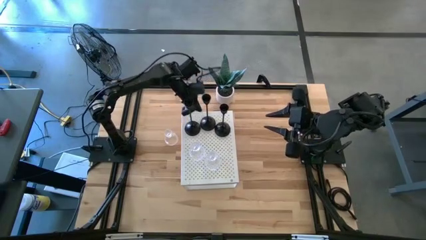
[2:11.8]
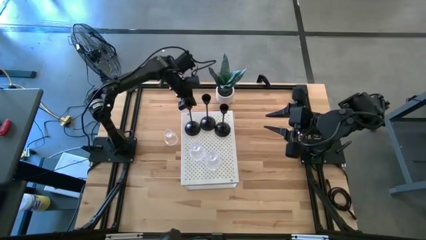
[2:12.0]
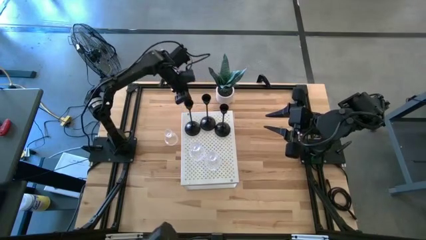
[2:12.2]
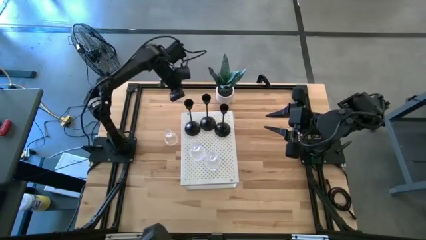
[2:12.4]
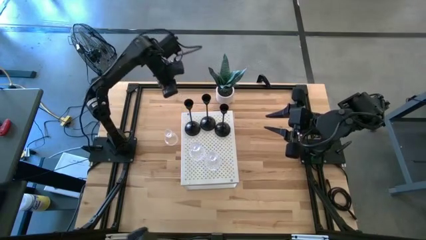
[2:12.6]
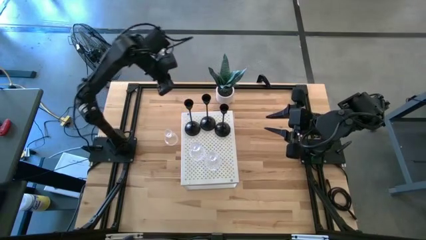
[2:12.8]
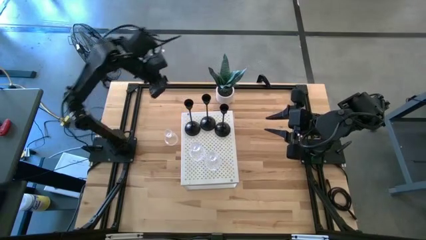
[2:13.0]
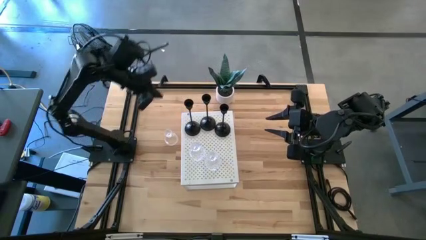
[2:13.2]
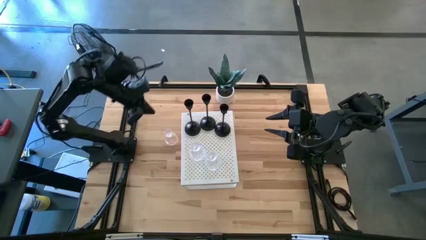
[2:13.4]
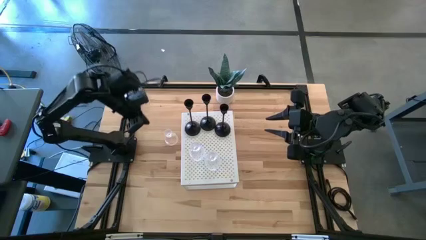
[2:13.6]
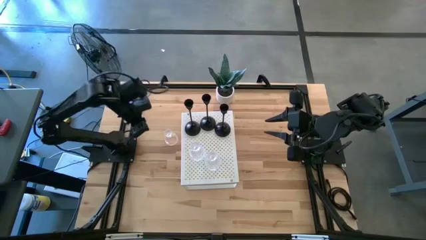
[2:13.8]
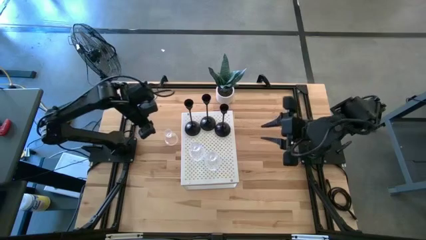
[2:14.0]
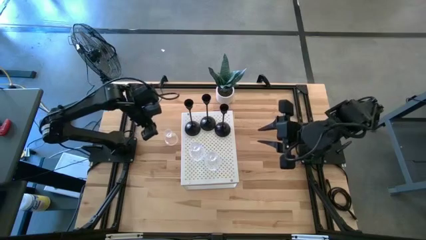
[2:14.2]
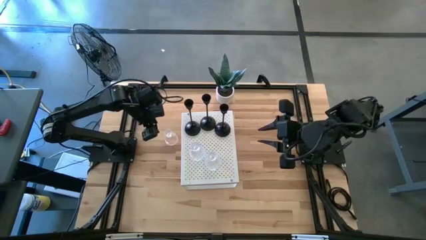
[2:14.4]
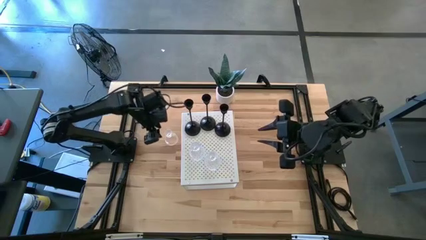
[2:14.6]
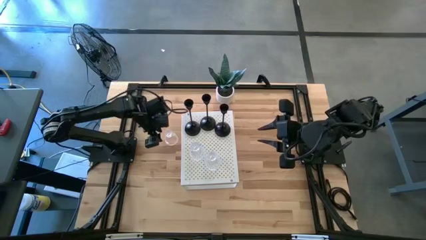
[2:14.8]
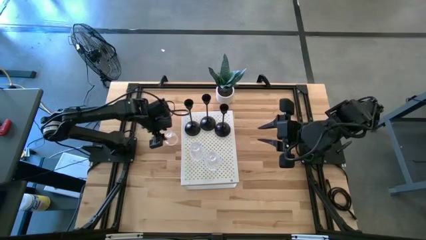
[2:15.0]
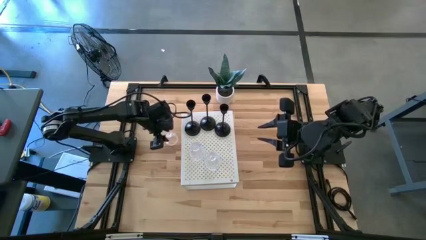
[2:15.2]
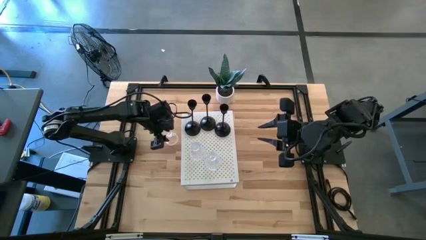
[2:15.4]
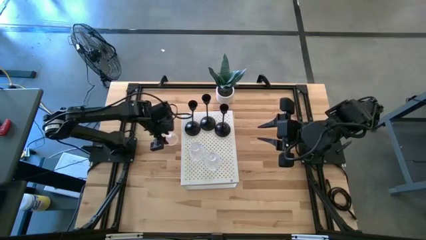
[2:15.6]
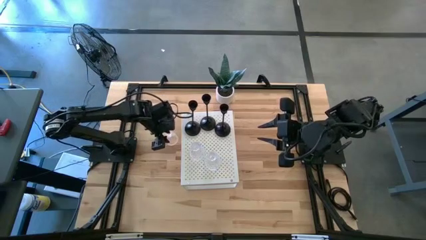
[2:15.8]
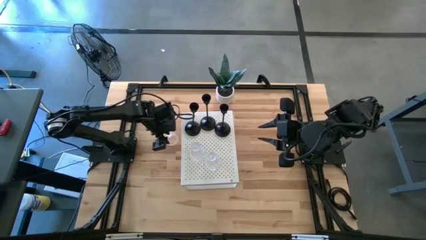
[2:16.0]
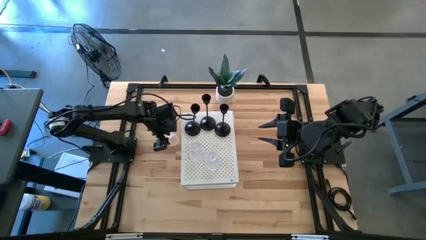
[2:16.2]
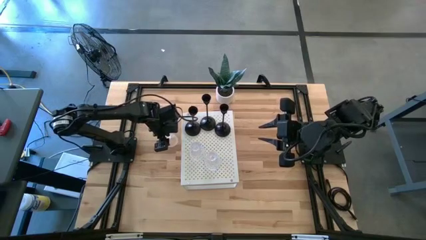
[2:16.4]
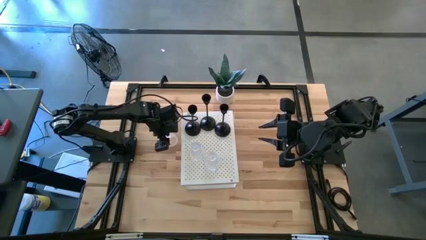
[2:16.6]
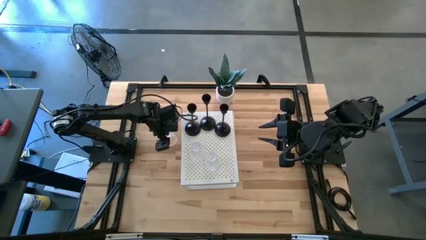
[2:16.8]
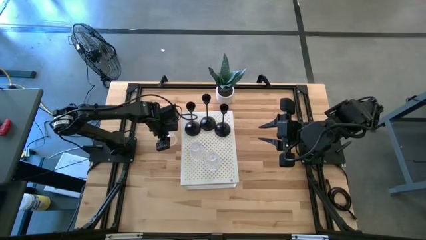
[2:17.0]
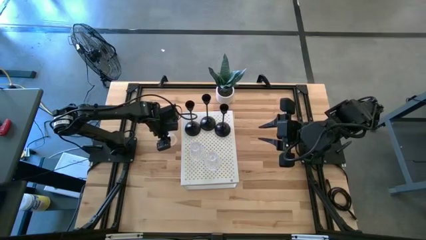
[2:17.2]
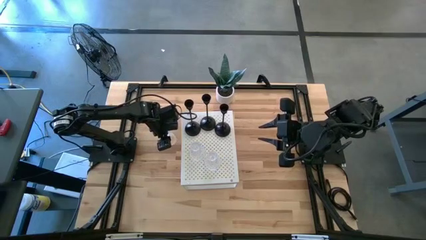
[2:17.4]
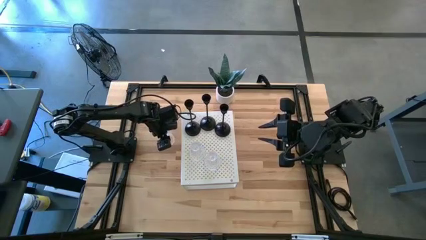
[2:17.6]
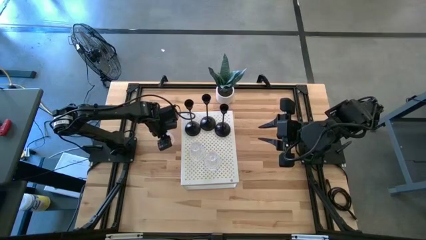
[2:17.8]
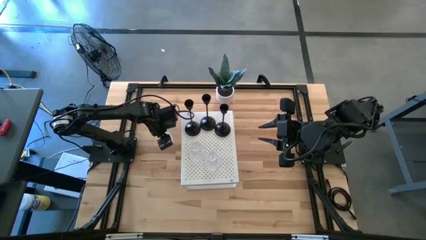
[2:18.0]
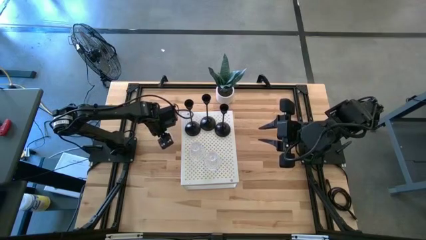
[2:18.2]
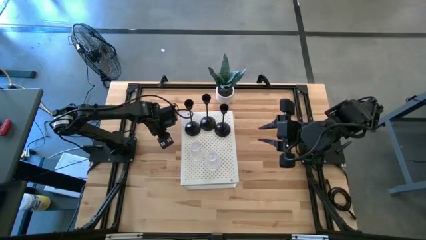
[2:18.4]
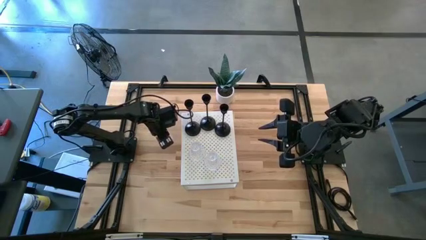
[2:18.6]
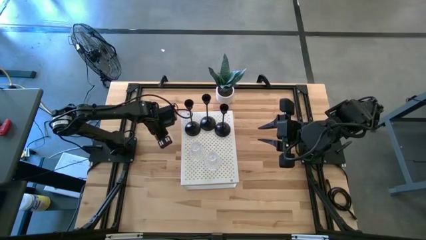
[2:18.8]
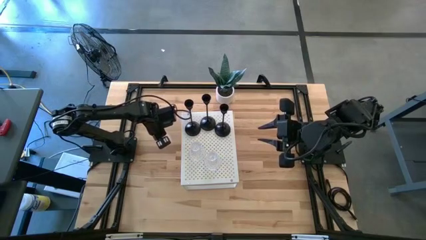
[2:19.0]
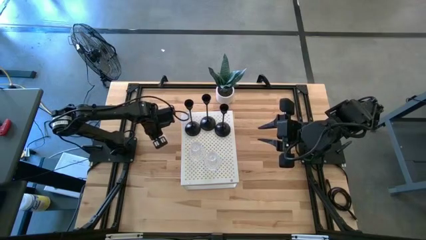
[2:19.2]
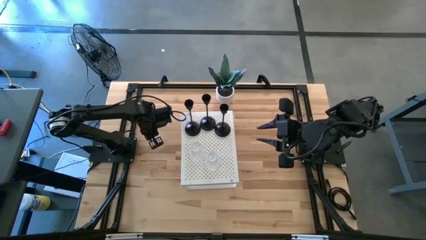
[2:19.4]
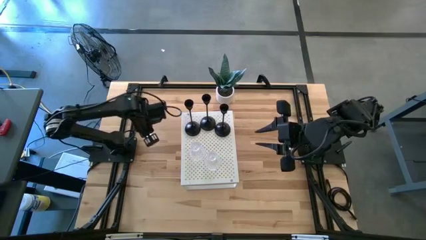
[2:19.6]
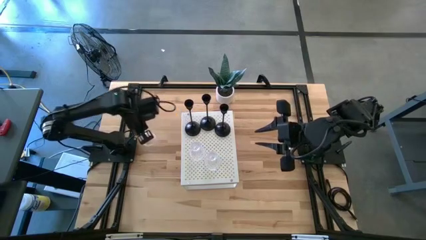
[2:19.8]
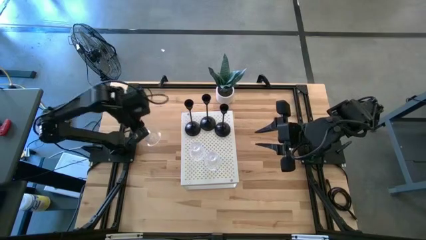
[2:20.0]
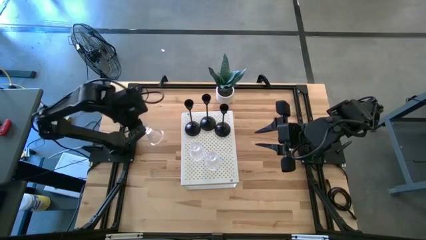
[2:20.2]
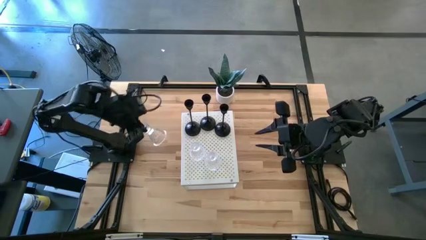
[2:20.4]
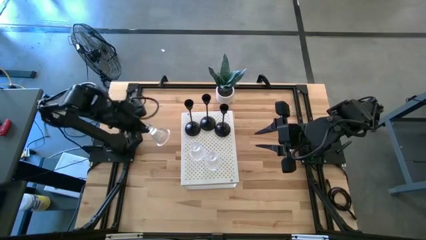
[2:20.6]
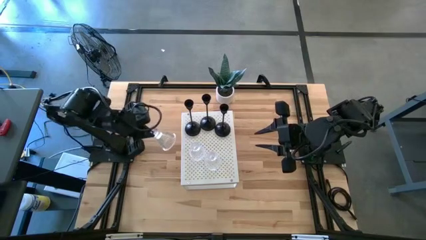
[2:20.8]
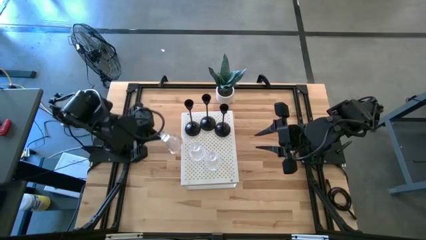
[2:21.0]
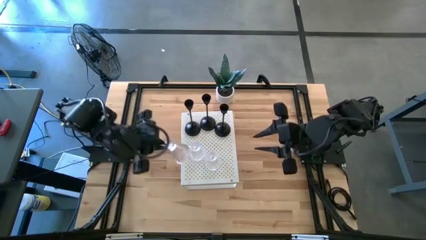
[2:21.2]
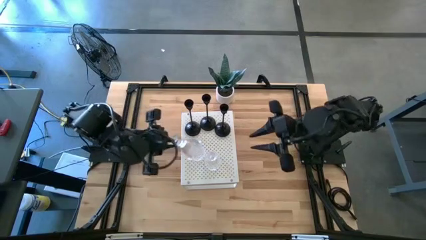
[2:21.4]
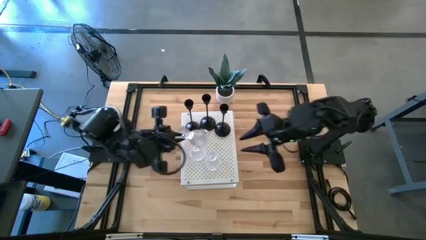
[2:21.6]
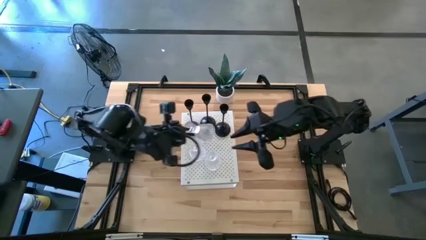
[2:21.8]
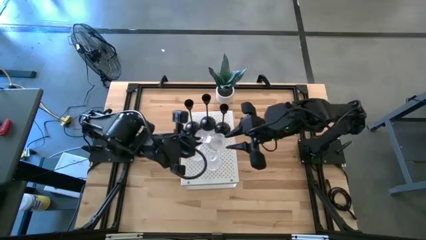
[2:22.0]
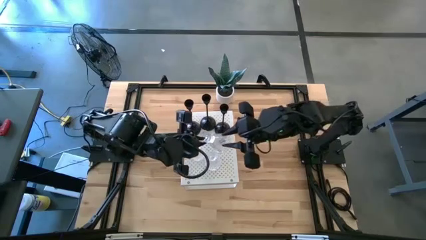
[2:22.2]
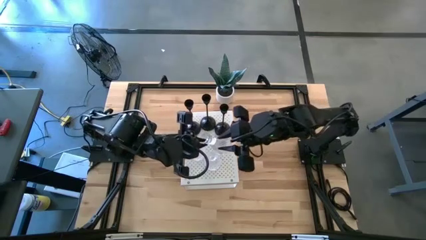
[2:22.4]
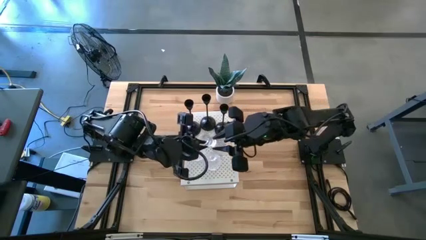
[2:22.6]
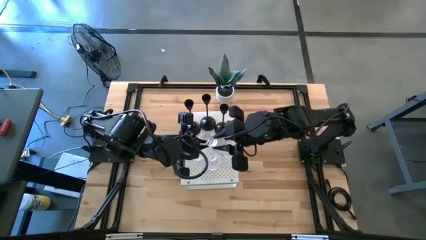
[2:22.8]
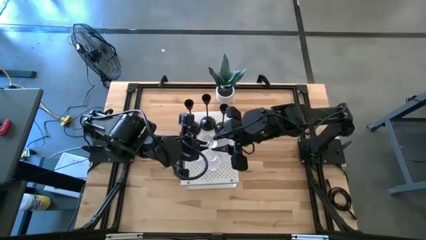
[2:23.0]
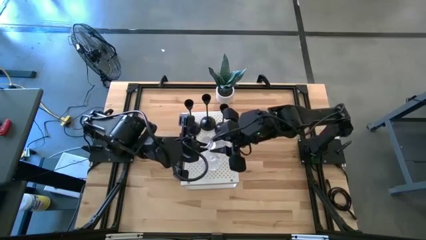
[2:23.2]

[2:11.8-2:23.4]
Task: Pick & Place candle stick holders
Put the transparent glass candle holder on the shelf

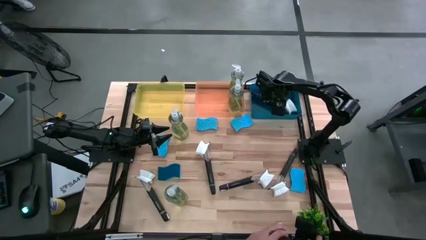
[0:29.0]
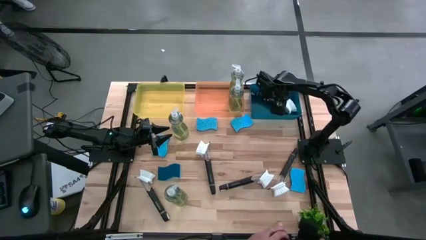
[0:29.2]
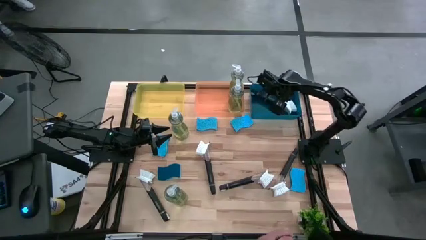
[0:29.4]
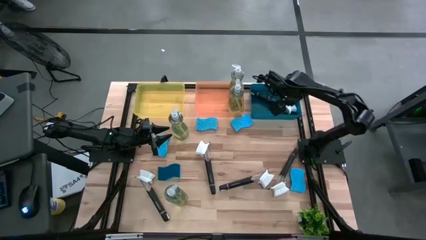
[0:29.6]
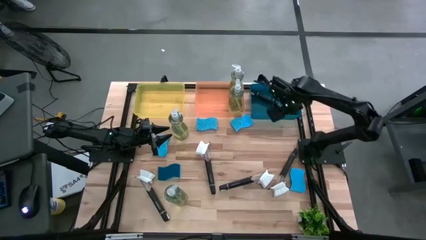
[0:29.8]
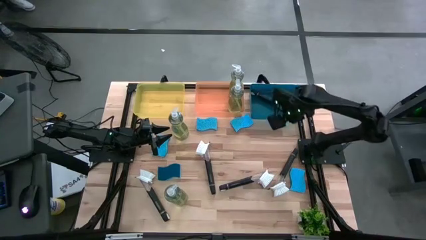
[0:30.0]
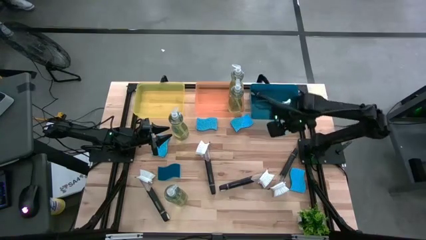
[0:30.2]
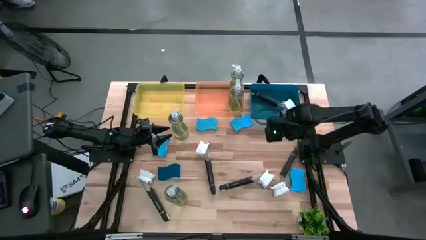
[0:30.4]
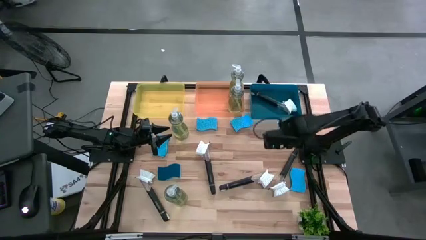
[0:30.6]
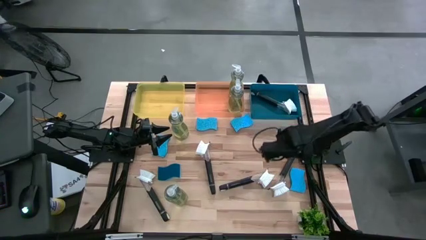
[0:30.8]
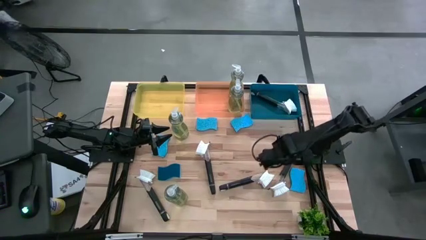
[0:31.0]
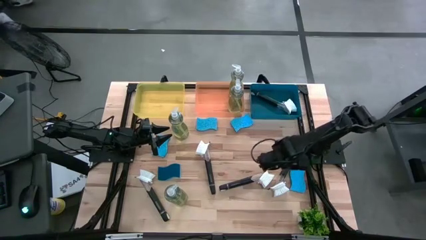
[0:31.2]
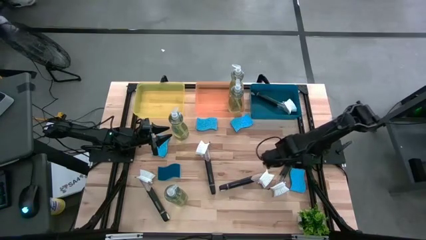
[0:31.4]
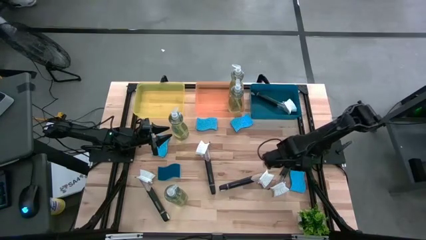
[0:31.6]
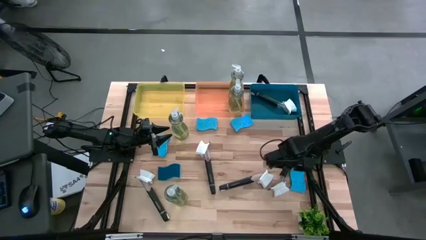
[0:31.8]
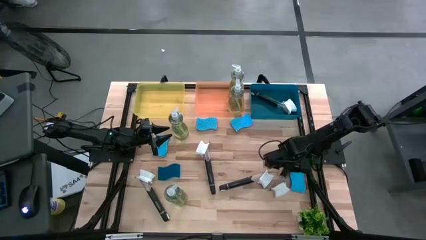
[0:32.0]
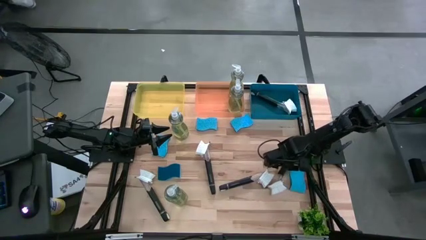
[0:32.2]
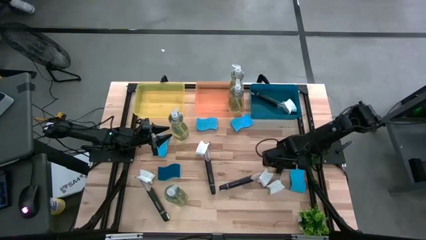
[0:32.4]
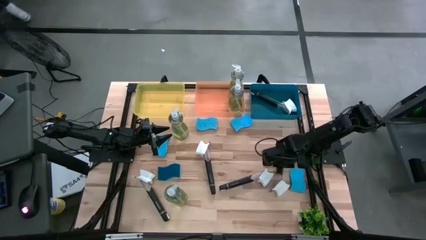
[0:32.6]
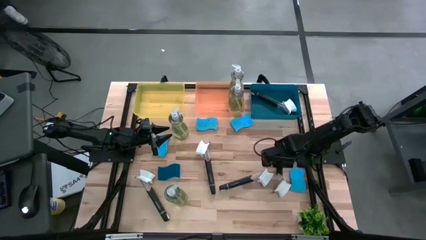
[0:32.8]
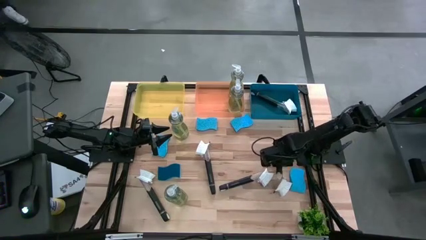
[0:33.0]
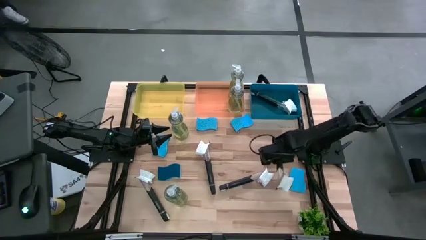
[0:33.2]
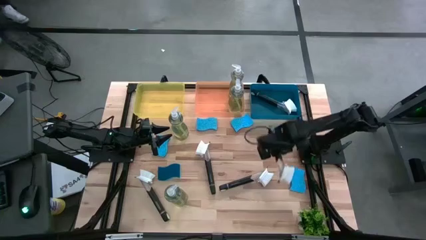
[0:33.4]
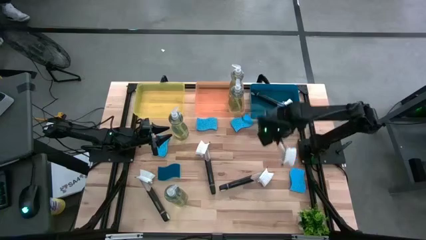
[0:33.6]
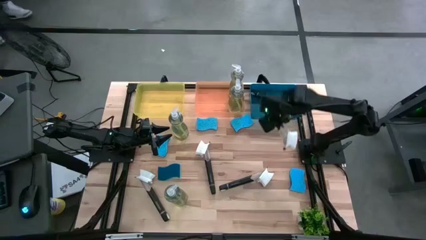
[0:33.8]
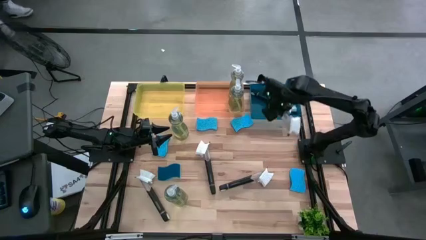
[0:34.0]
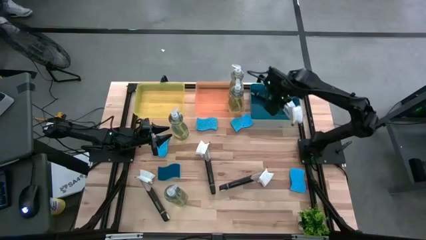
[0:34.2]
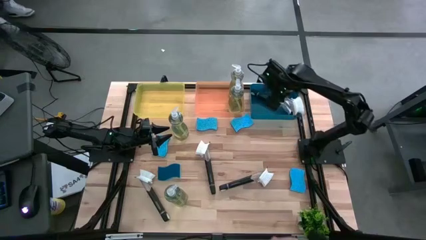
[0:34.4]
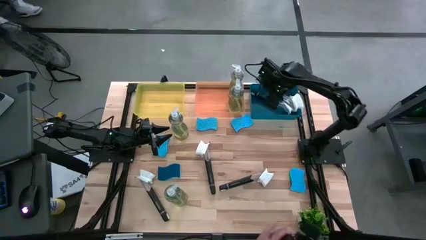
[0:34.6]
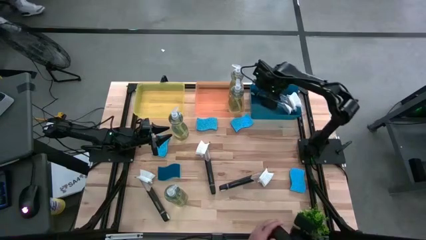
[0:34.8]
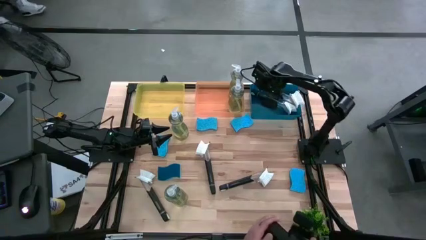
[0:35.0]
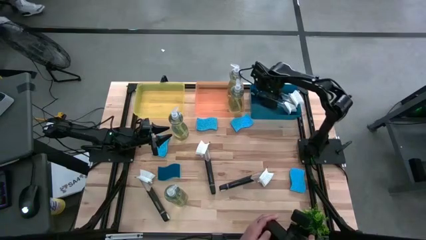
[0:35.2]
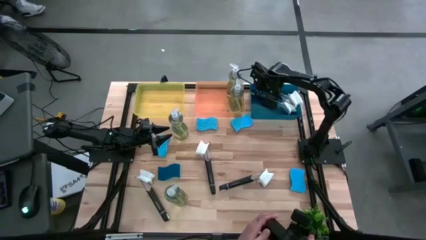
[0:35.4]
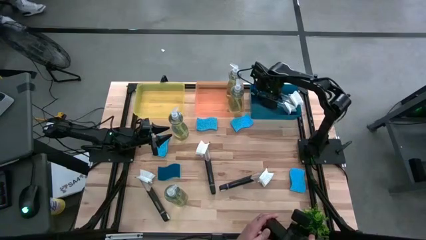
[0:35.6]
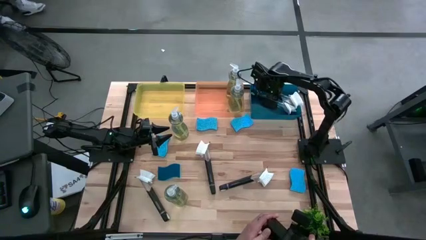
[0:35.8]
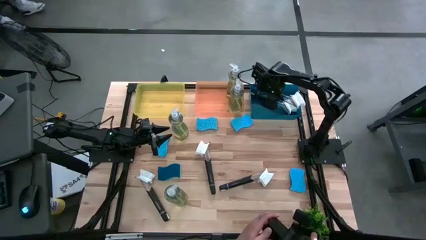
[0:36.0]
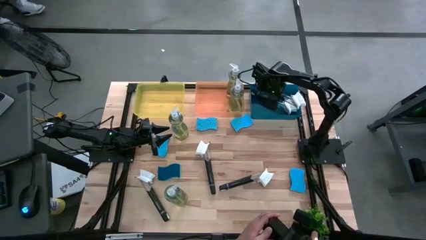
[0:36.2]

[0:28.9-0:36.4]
Task: Pick & Place Kitchen Sink Supplies
Put the black dish brush into the blue bin
